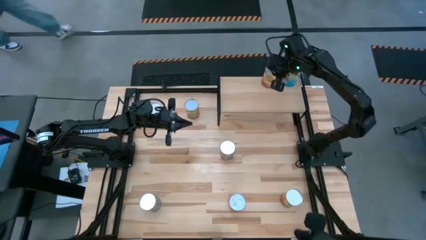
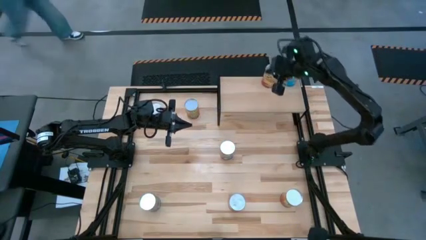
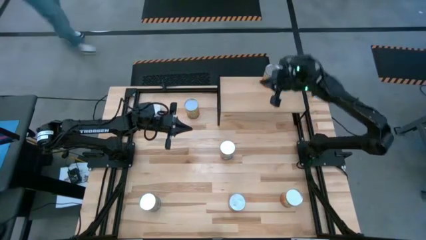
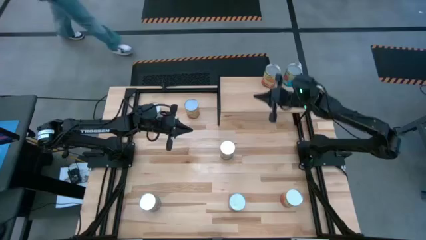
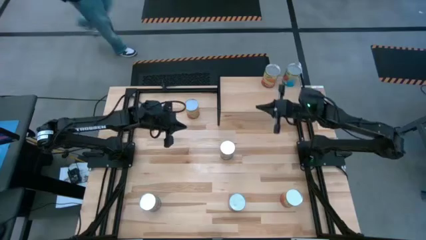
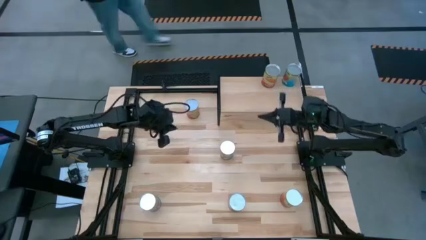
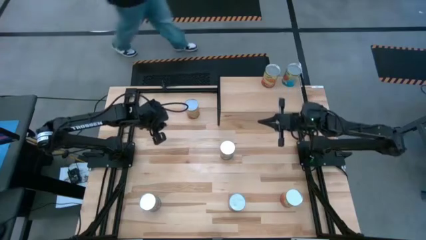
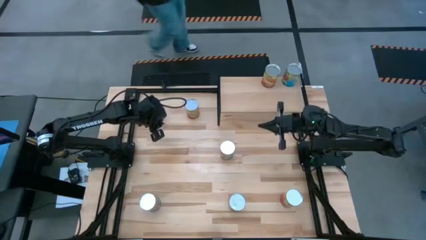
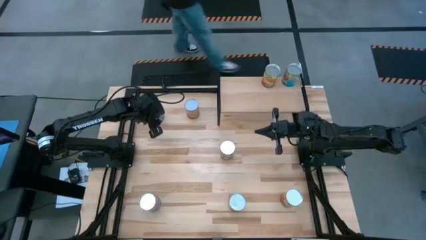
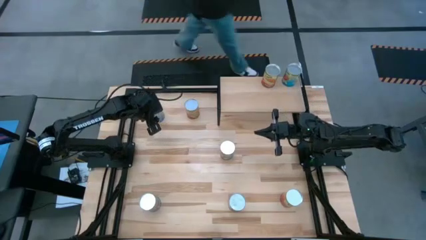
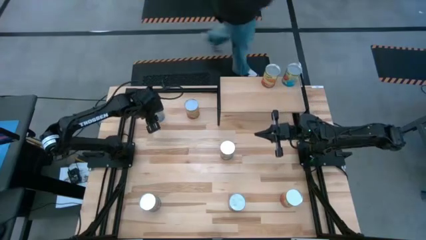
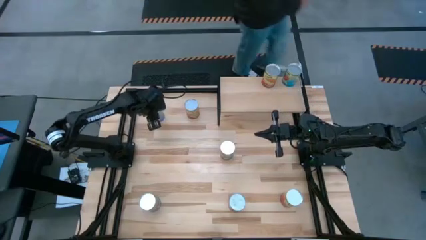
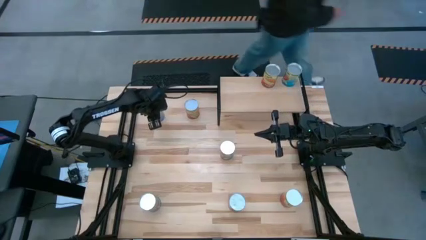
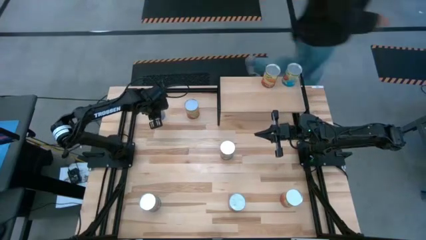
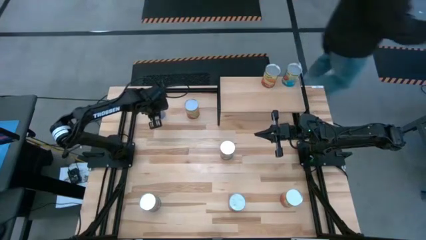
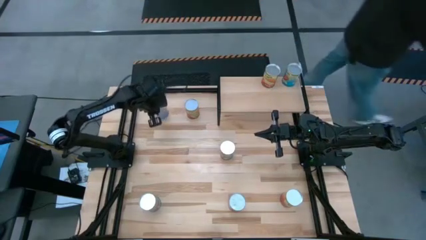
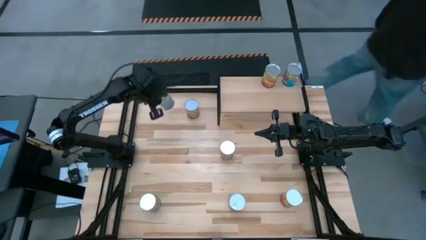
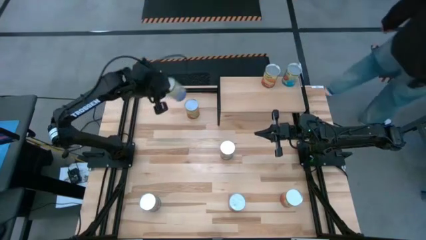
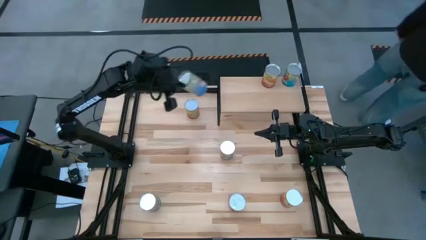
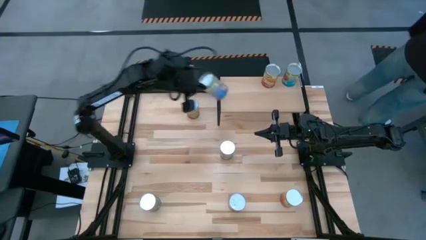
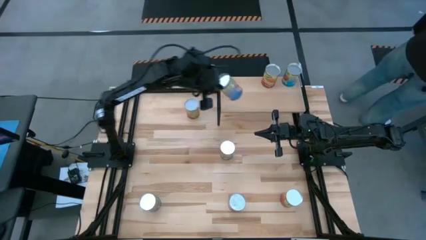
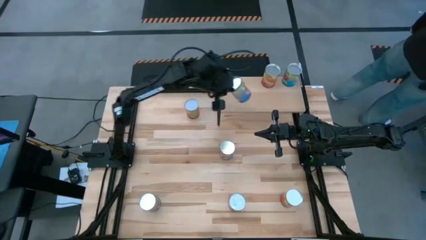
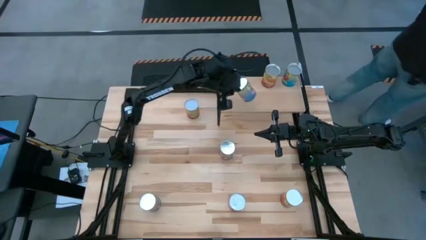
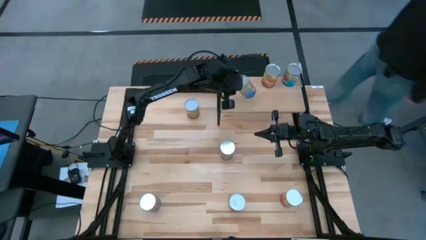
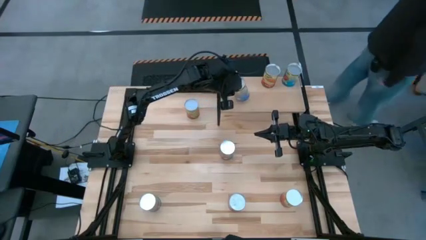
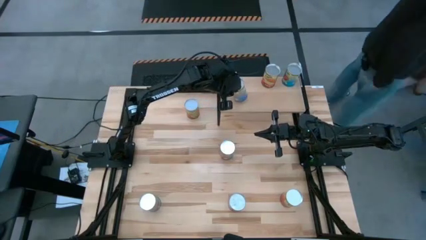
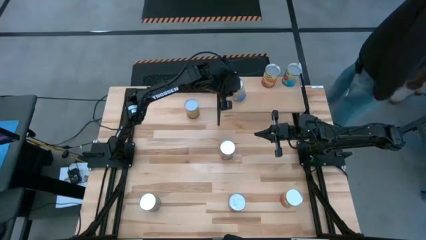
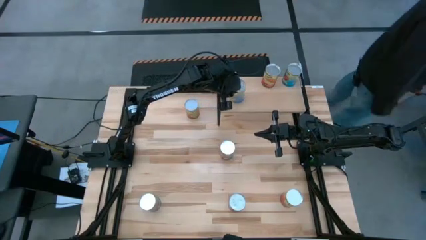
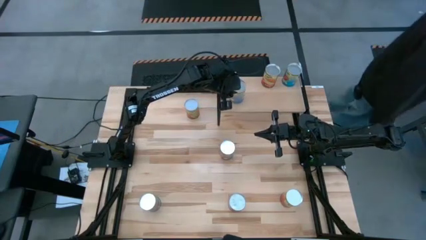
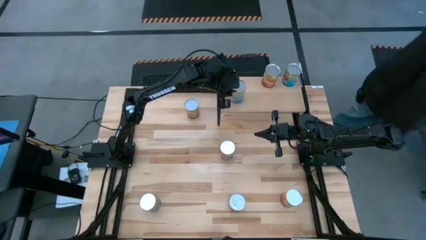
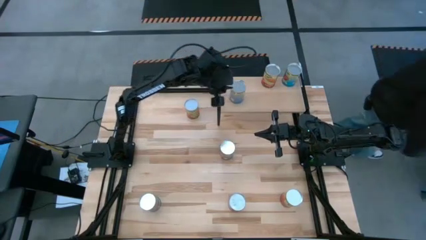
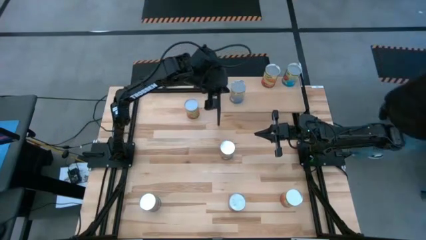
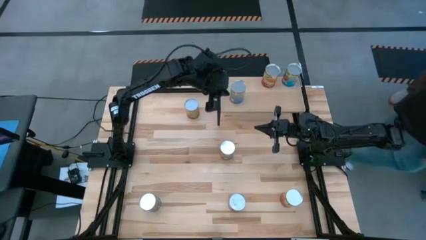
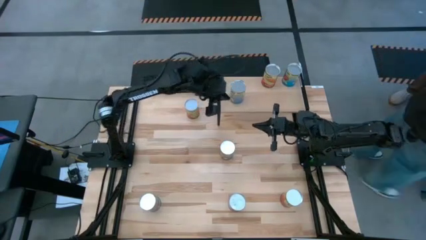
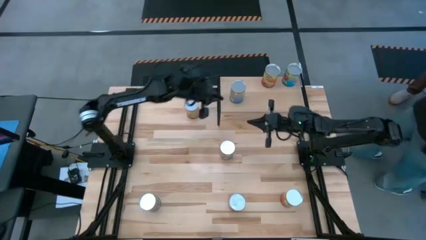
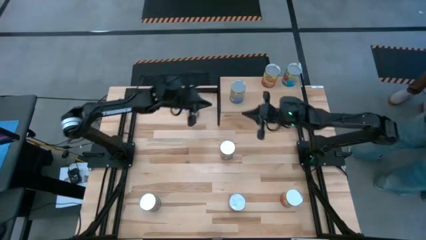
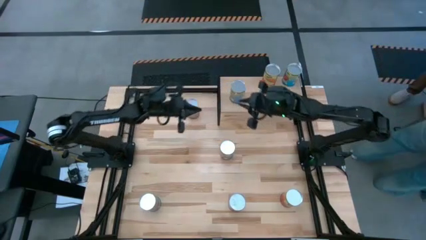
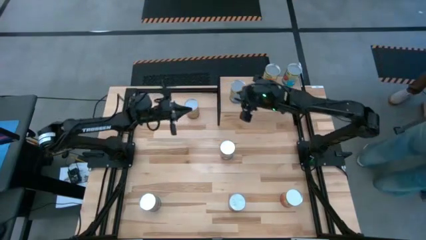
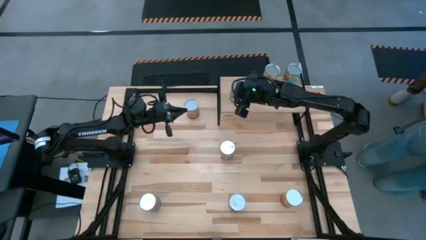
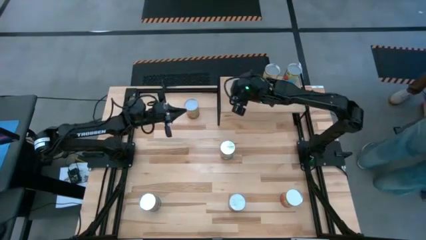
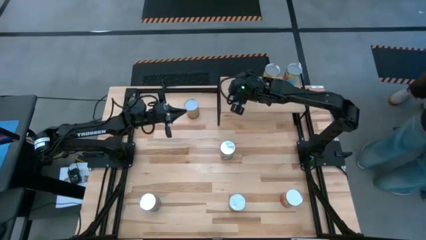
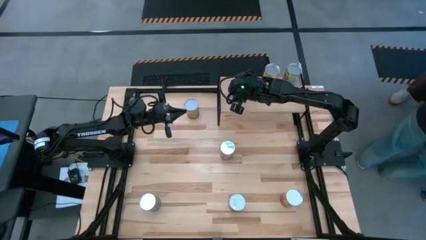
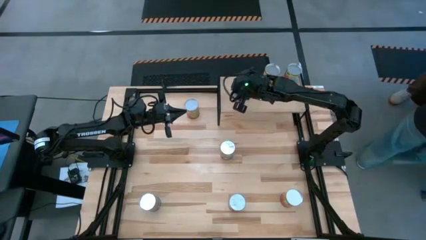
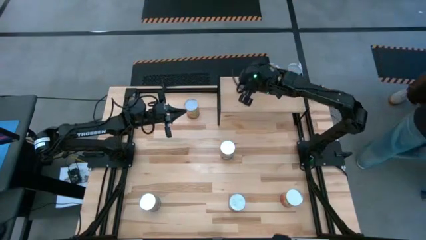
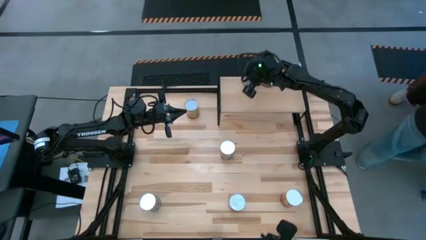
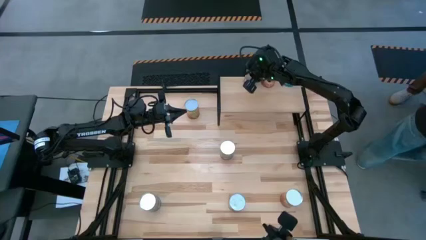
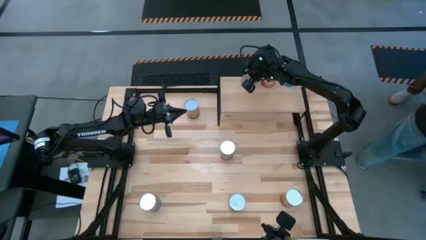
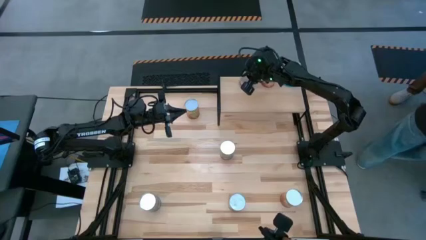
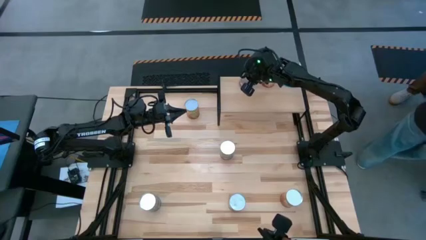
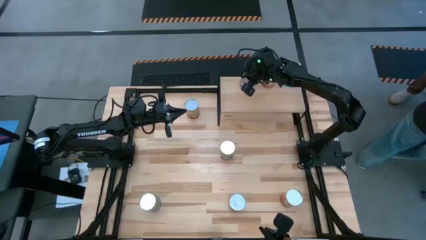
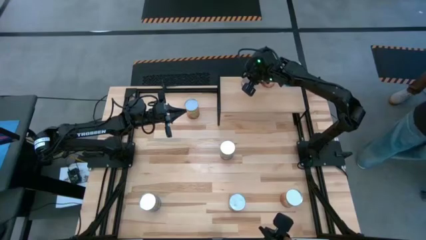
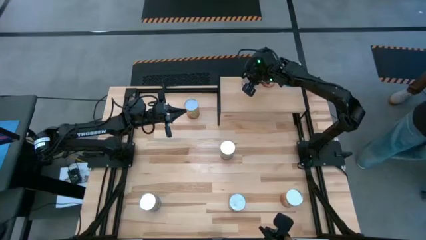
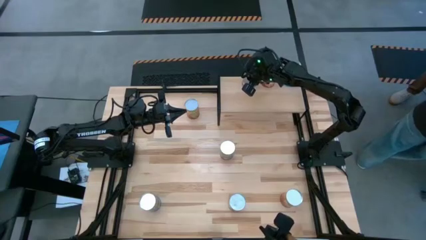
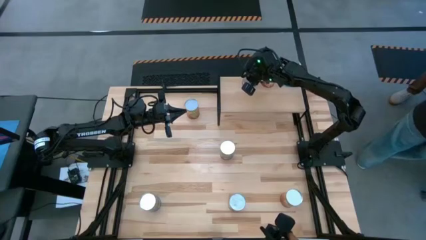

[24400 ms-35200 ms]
Task: Pick and place cans onto a shelf
Put the top canned peaches on the shelf

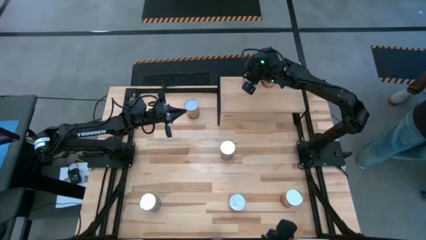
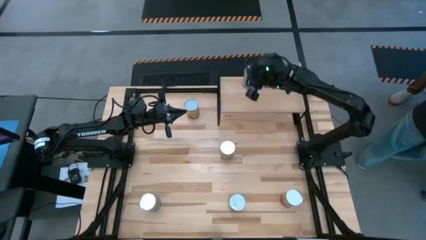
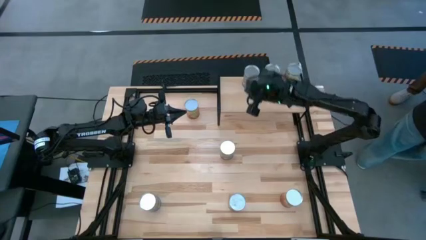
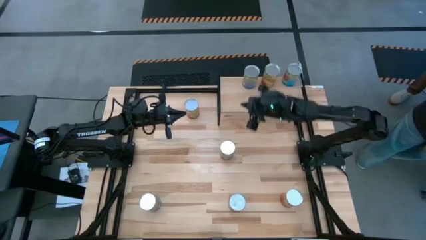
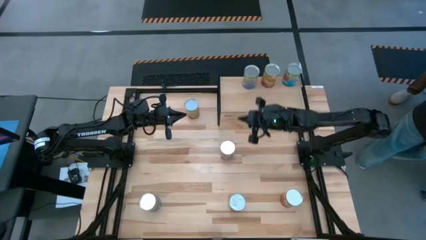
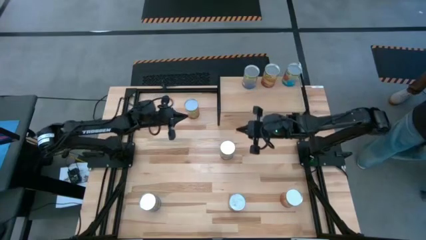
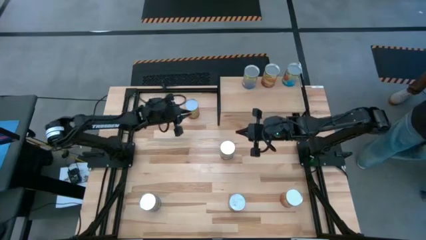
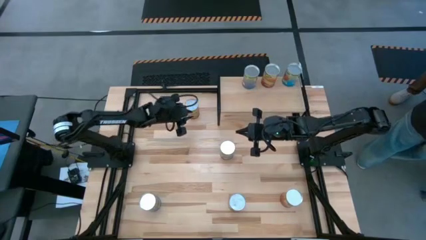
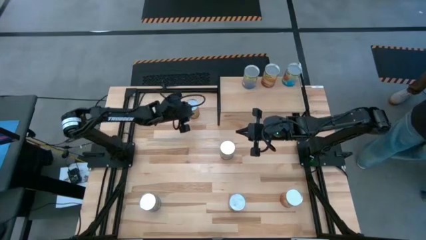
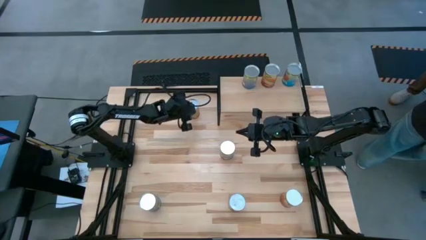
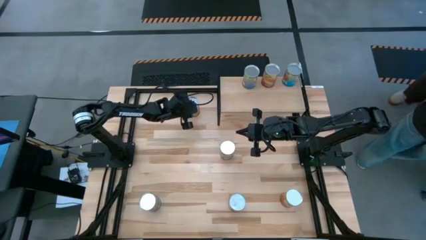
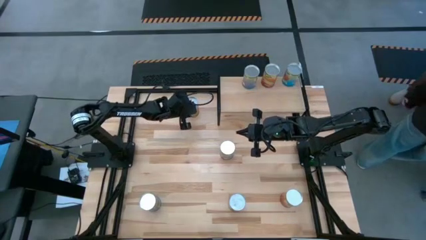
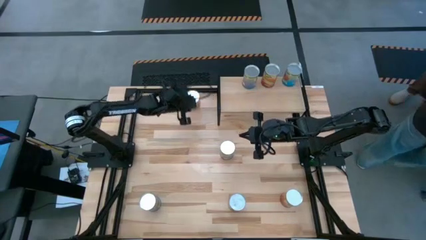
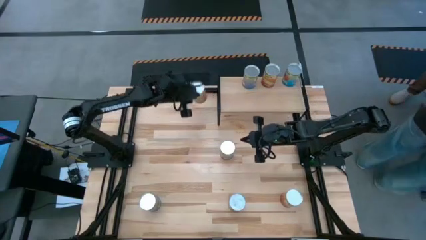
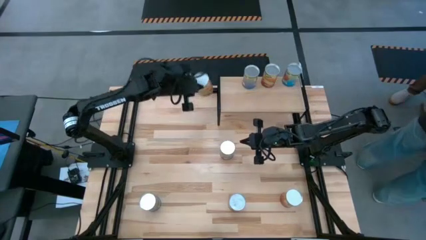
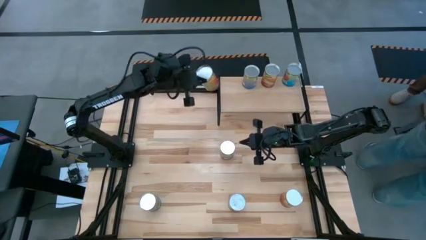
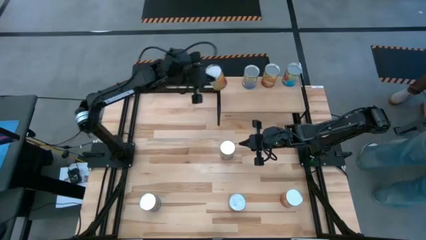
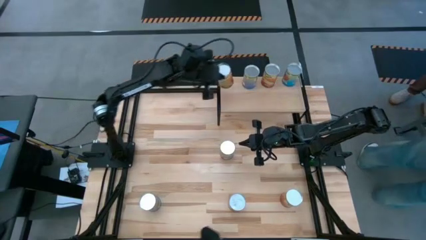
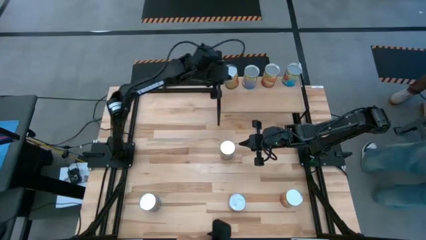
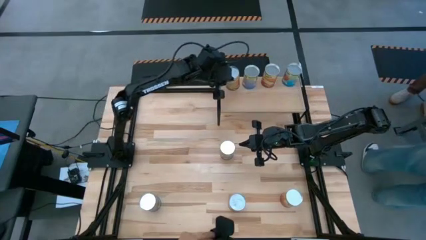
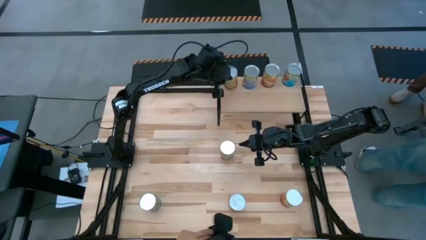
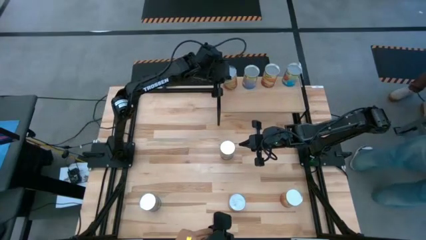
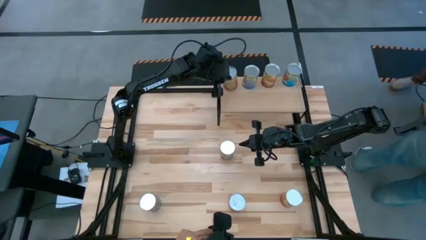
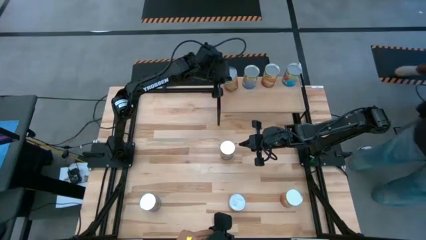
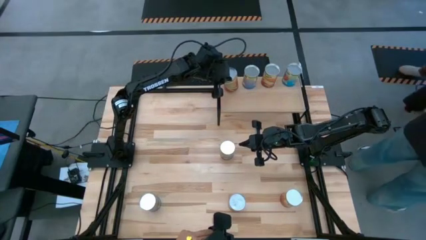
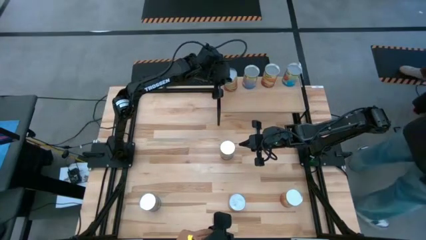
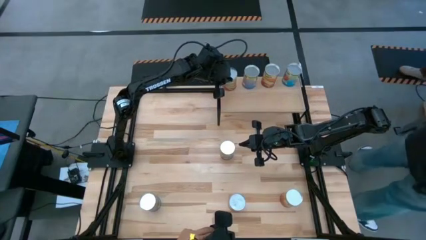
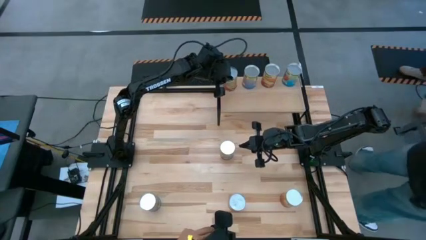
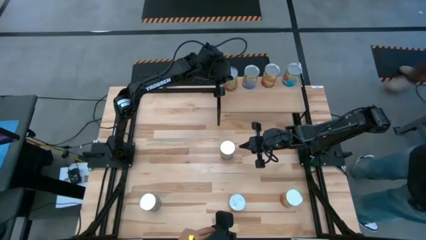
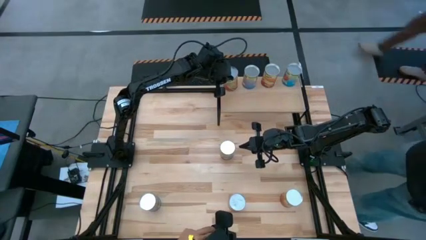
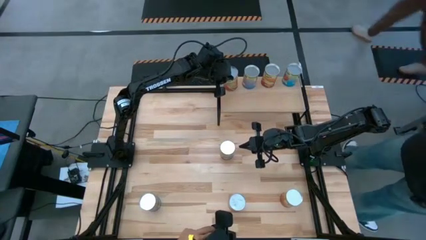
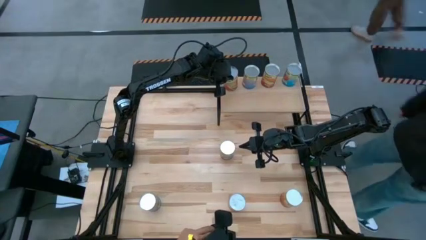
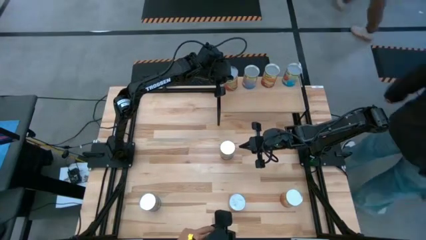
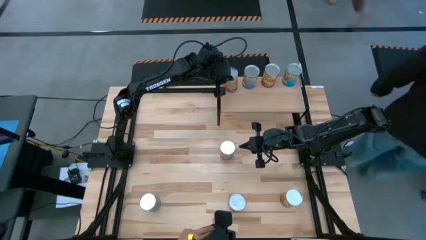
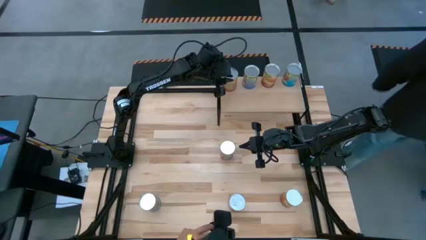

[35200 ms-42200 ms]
Put the top canned green peas on the shelf
